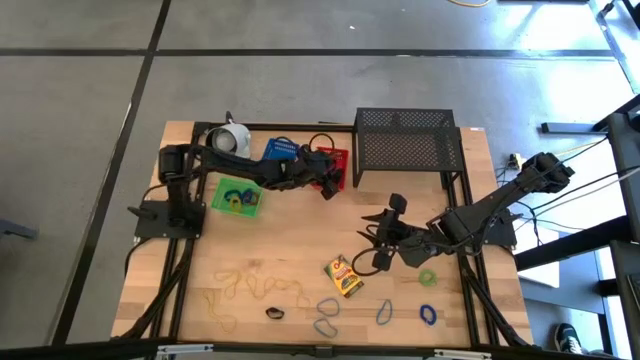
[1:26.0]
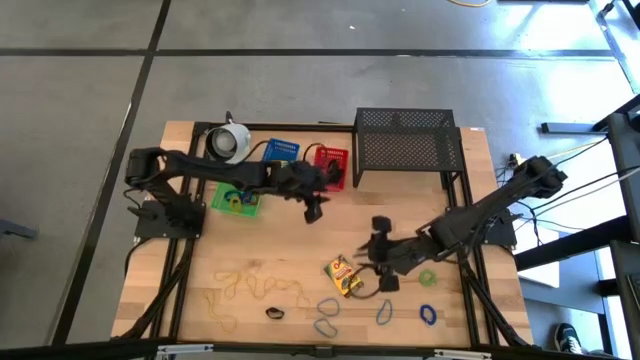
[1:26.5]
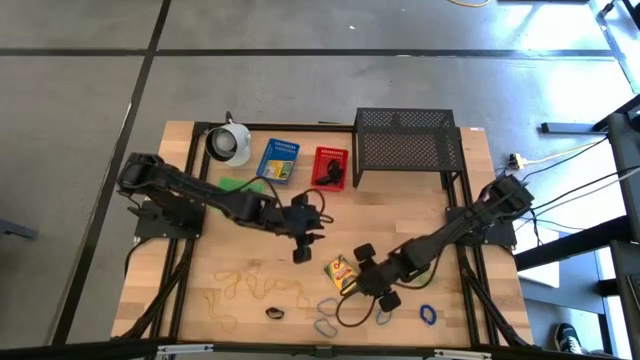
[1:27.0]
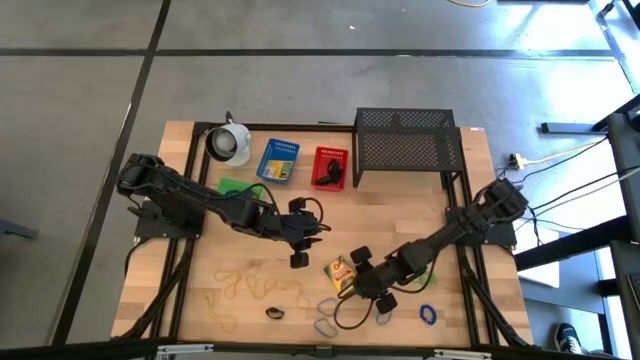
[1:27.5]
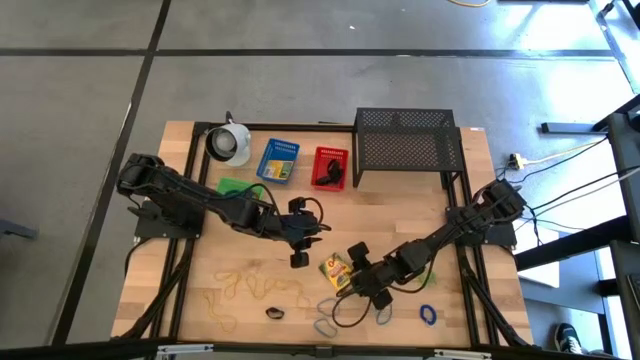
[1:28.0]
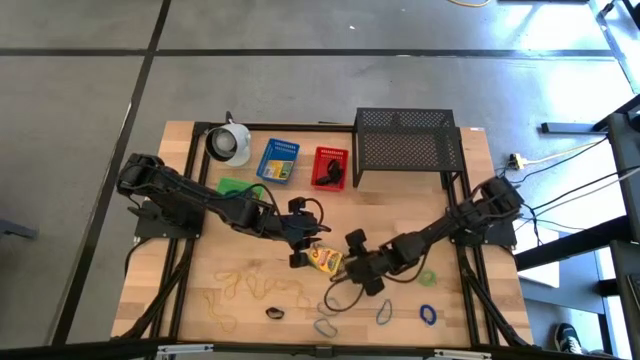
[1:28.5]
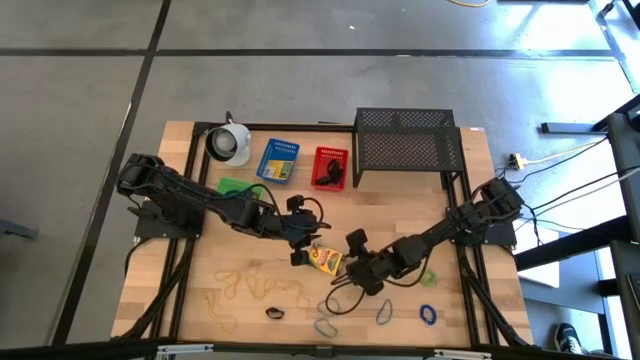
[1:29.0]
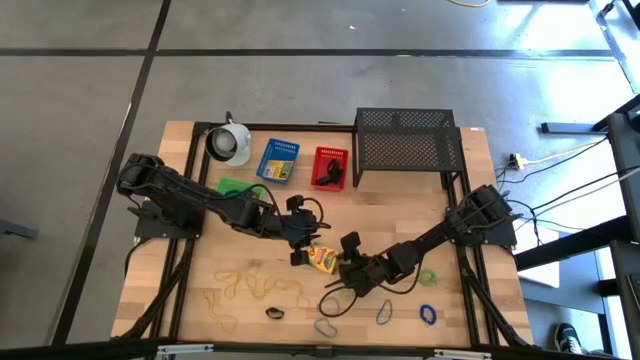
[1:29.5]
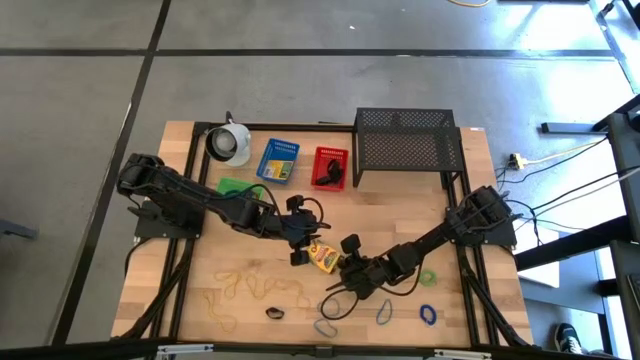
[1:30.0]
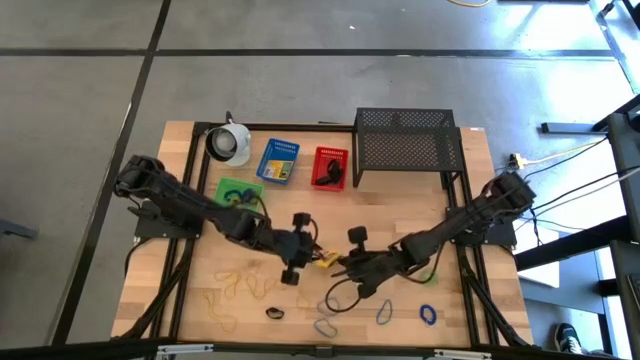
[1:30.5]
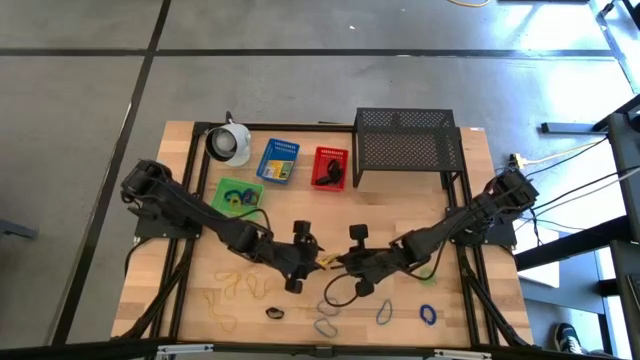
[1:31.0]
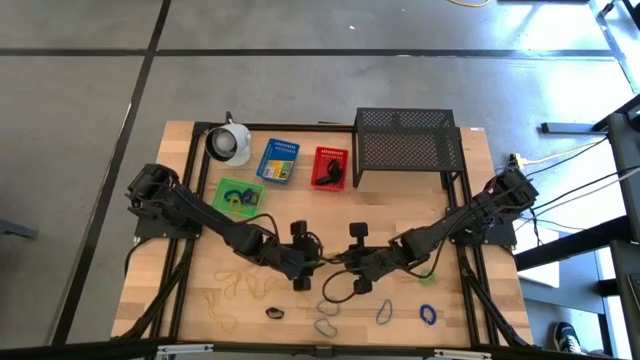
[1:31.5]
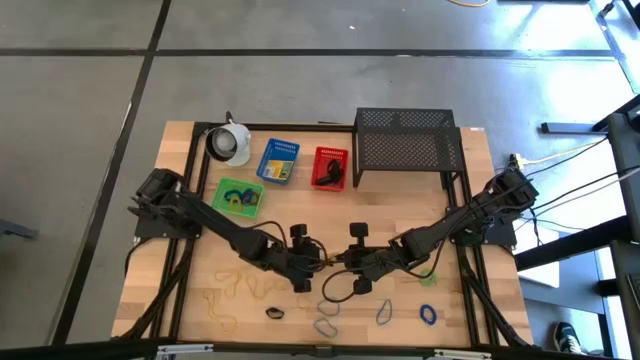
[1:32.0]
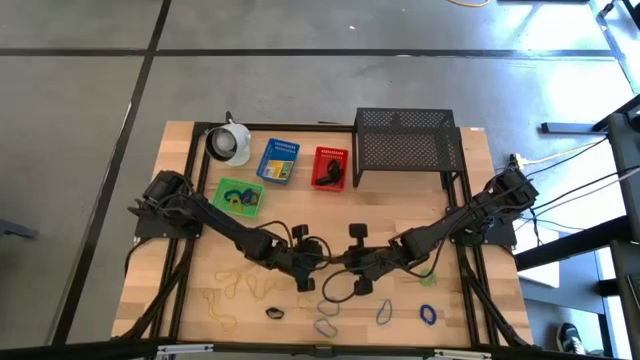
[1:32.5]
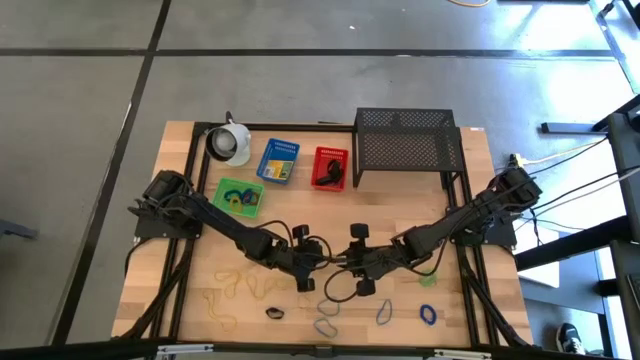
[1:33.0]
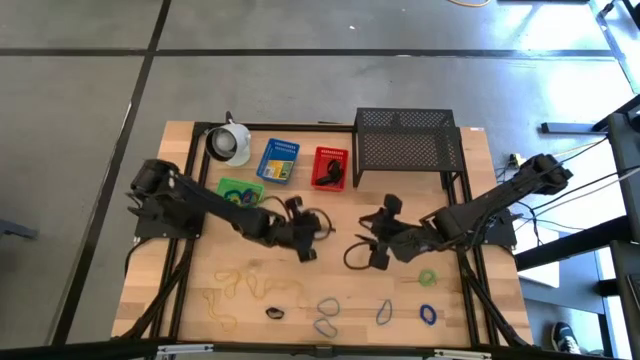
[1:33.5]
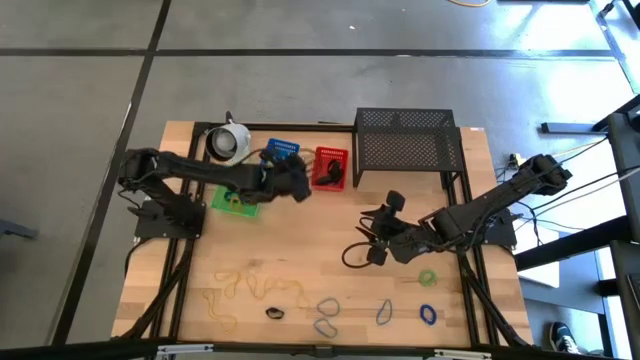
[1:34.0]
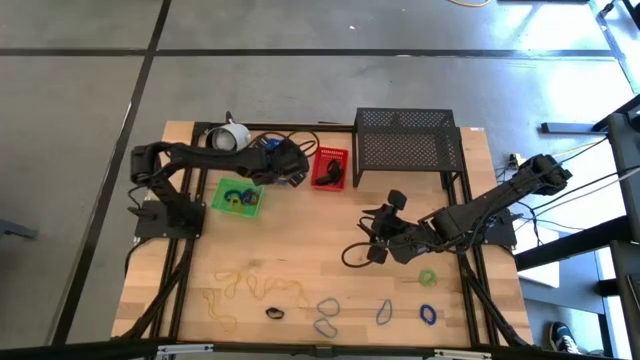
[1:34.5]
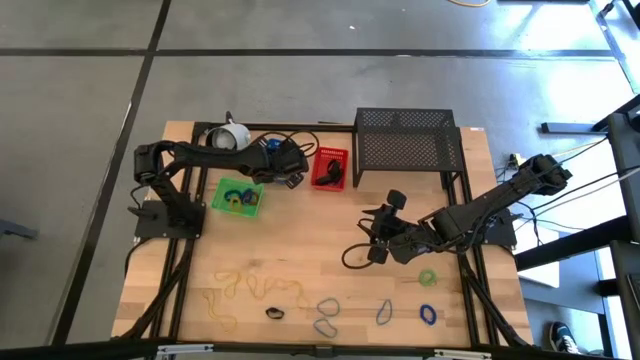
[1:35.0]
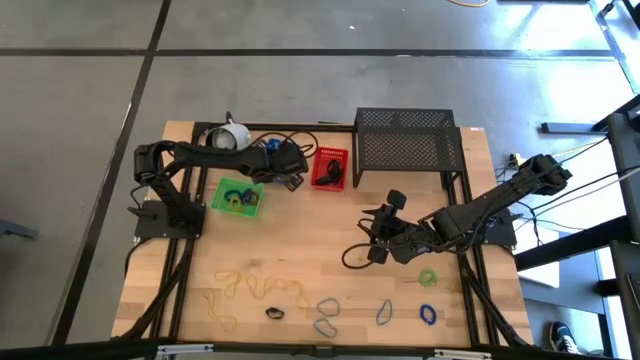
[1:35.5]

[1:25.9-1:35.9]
Task: Pick & Place Office Desk Supplies
Put the yellow crayon box into the blue bin

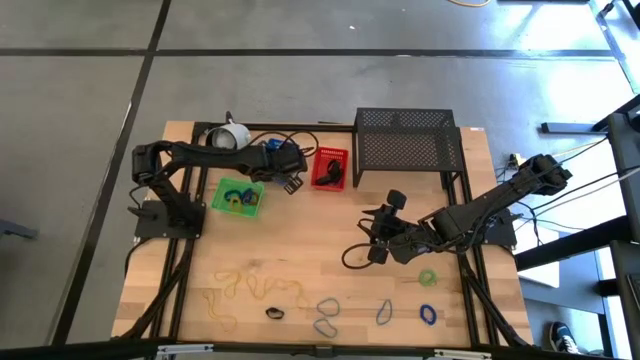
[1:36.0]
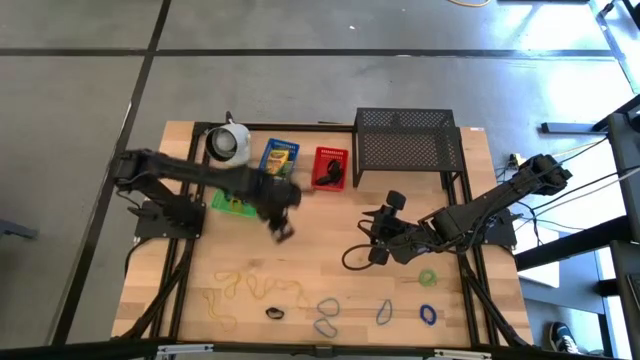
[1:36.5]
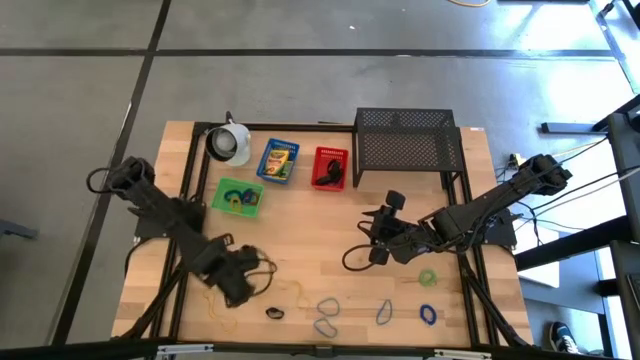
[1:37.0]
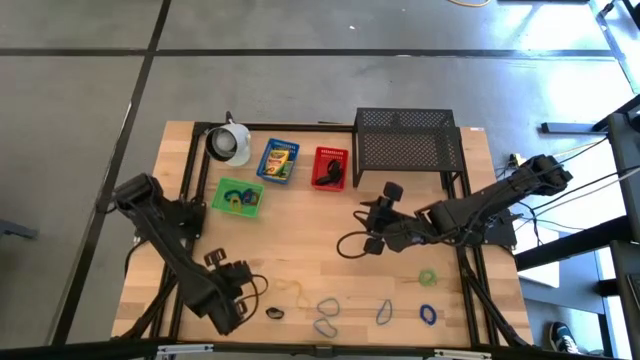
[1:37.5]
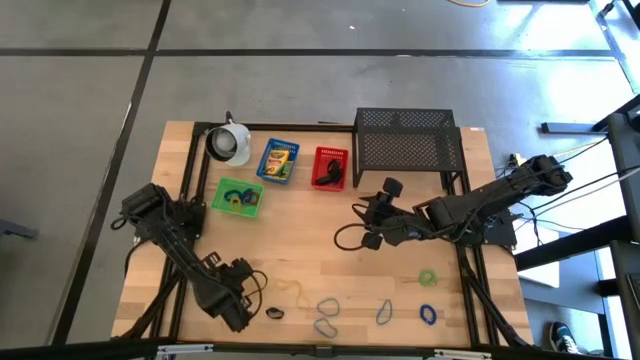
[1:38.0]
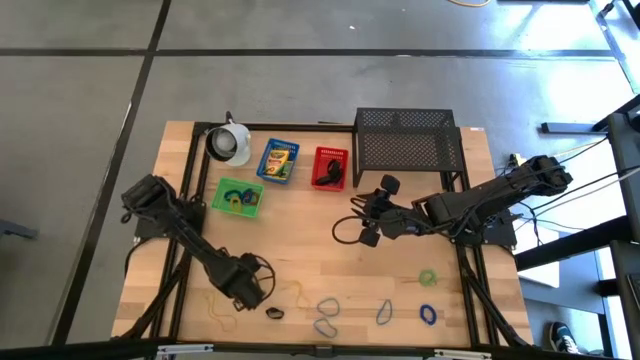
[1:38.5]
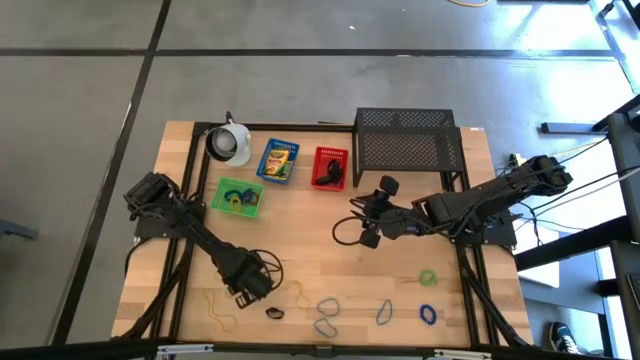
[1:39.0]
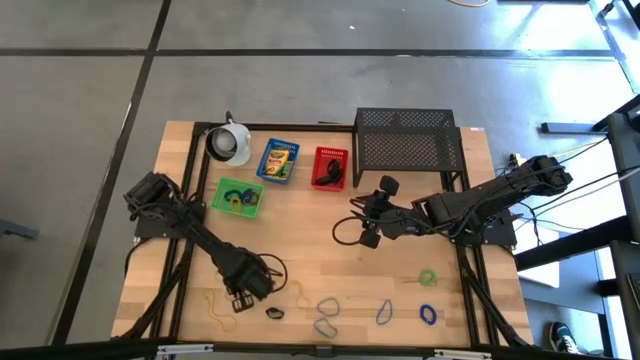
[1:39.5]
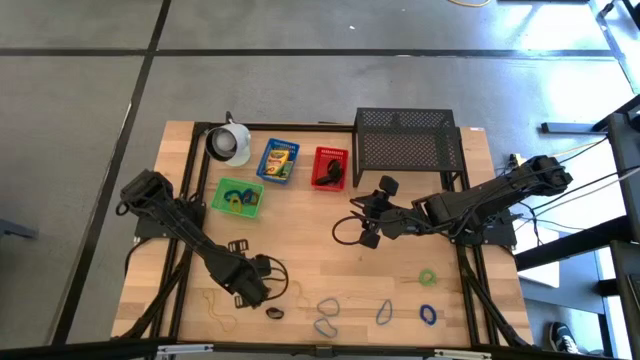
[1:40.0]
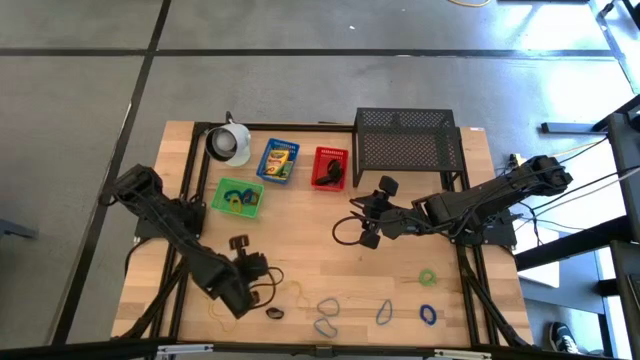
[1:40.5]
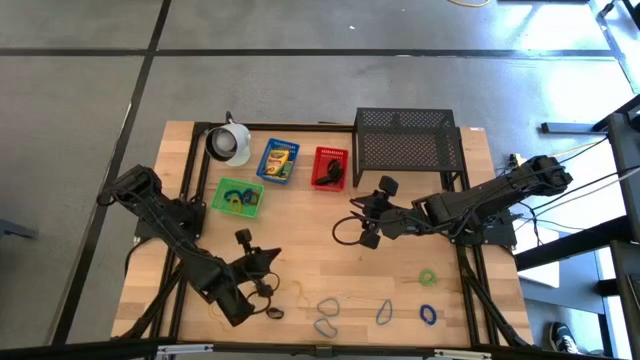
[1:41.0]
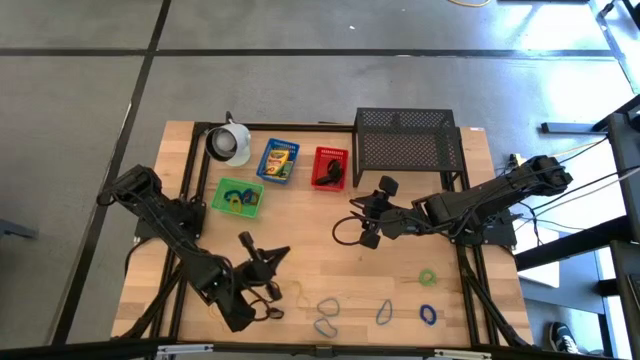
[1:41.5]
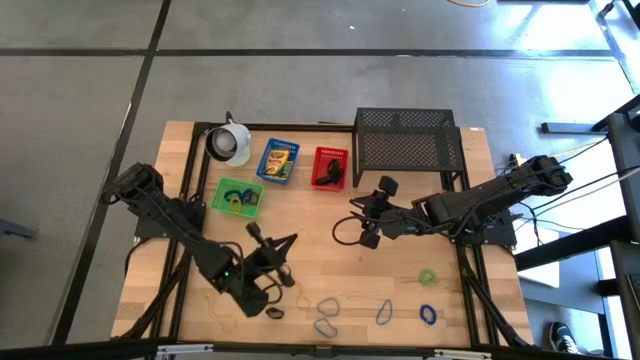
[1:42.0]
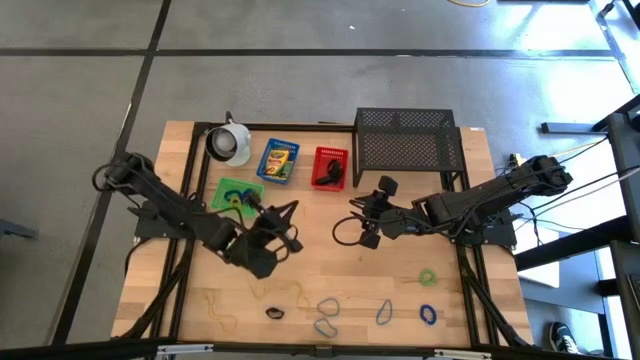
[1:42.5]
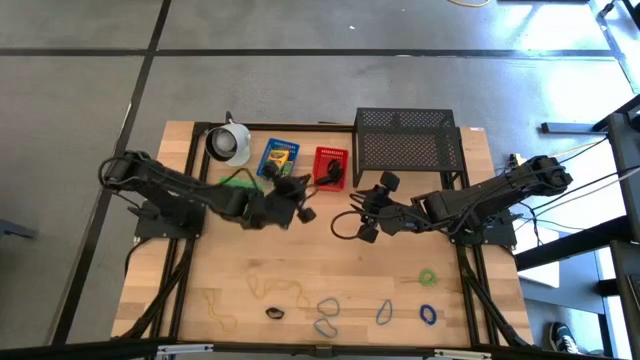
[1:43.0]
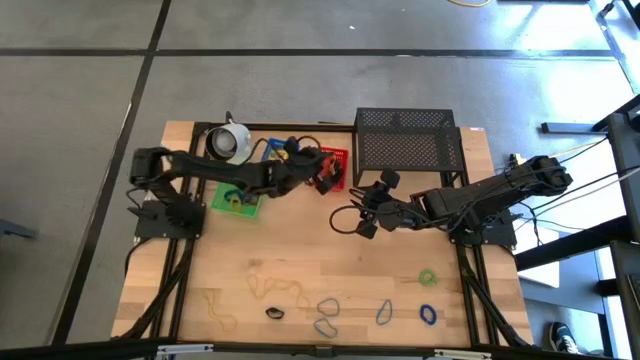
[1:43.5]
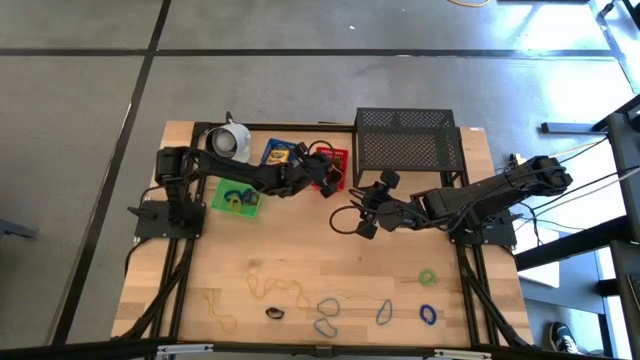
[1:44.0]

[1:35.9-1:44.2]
Put the yellow rubber band into the red bin

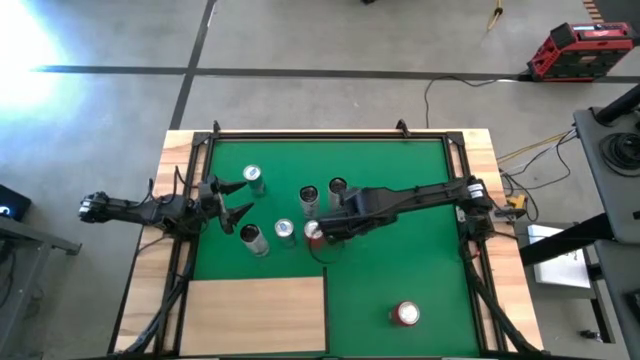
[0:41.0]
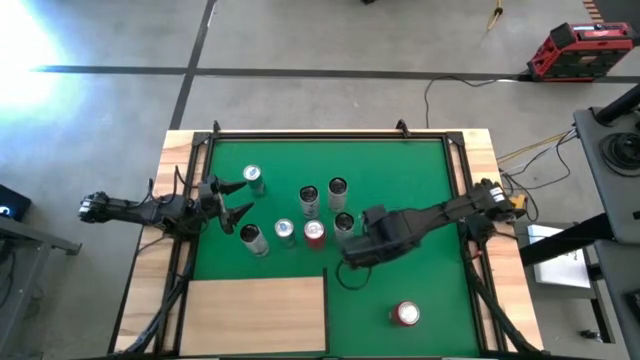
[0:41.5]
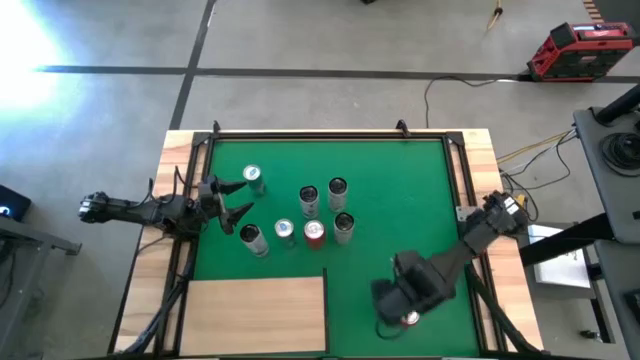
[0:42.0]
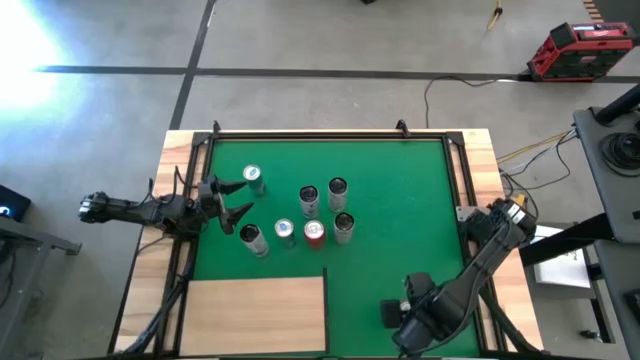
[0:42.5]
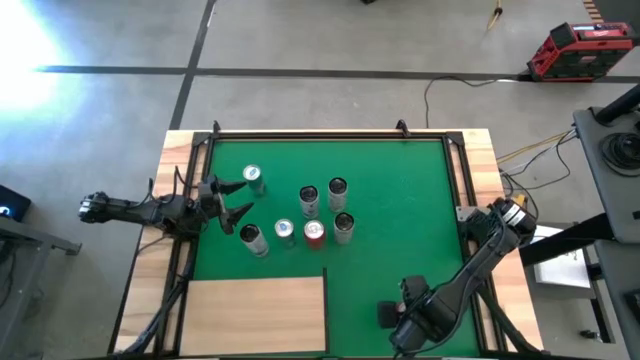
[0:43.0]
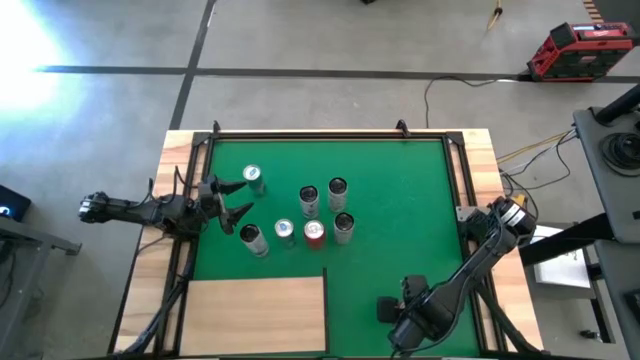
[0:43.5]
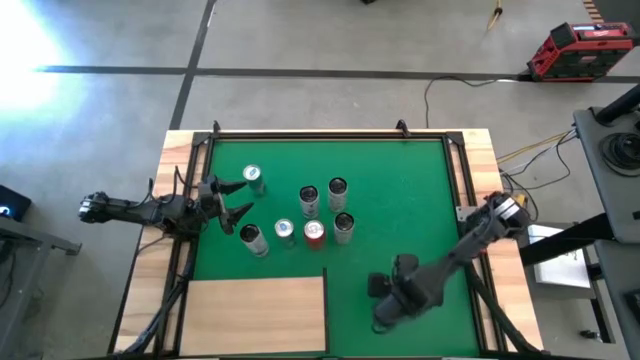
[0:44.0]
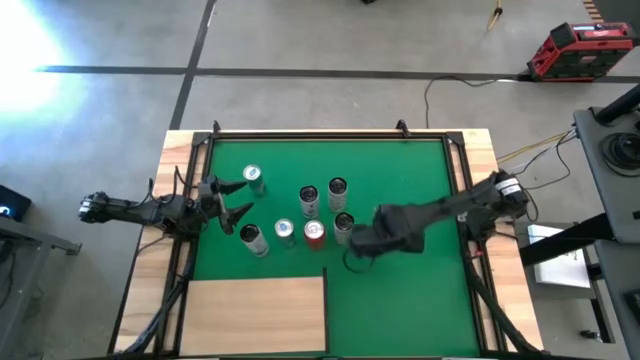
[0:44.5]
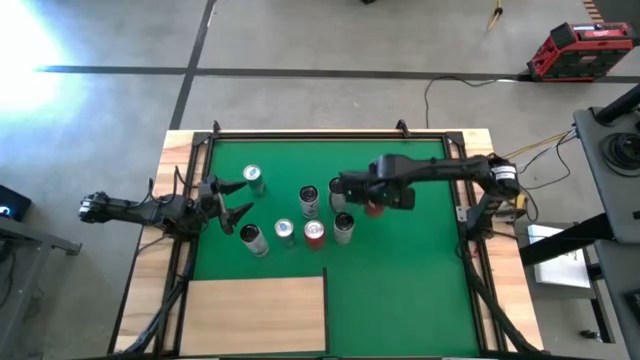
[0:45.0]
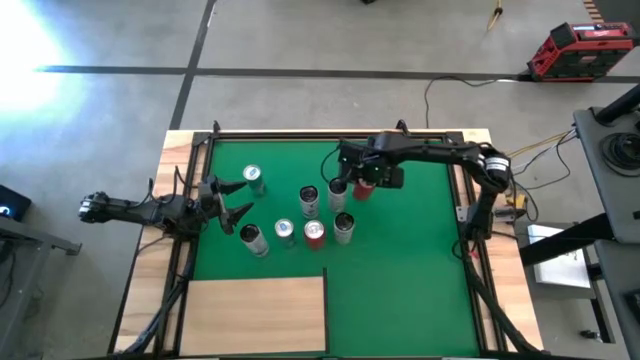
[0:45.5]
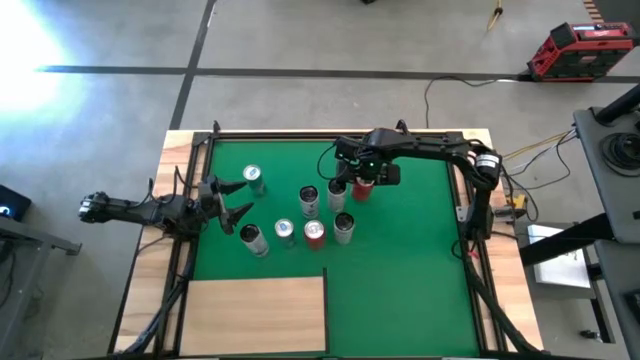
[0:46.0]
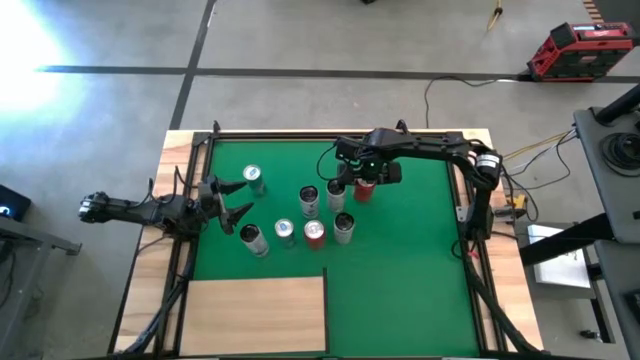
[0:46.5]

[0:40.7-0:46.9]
Task: Place canned beverage on shelf
Move the bottom red soda can to the center of the table
